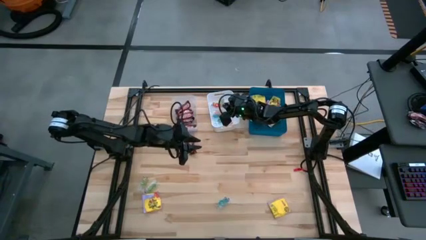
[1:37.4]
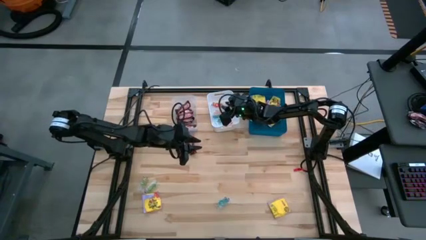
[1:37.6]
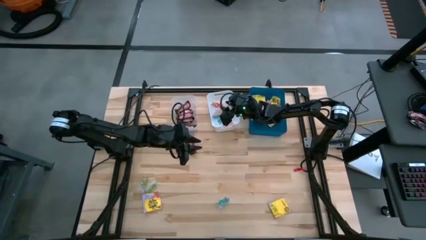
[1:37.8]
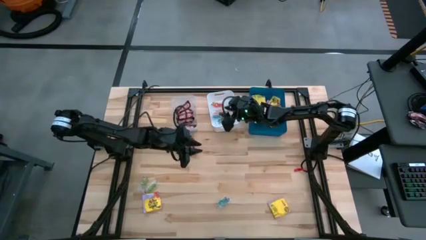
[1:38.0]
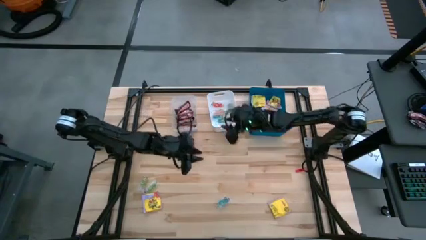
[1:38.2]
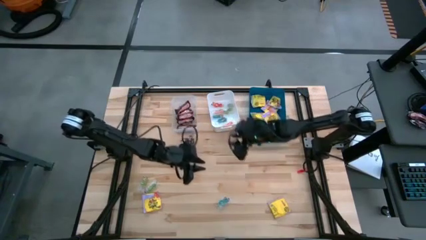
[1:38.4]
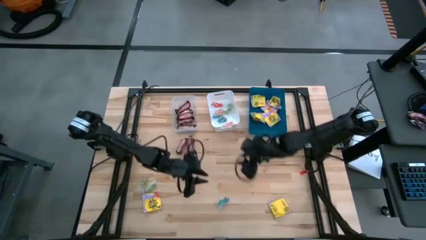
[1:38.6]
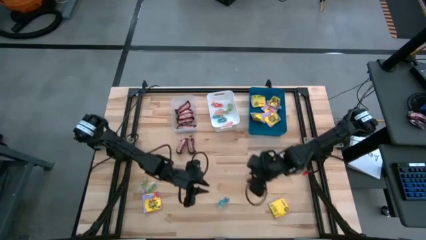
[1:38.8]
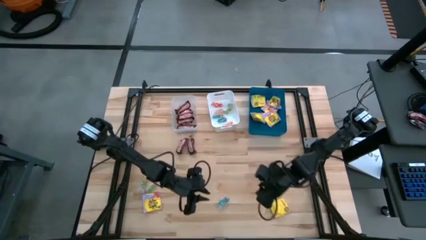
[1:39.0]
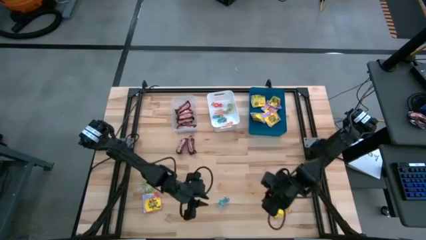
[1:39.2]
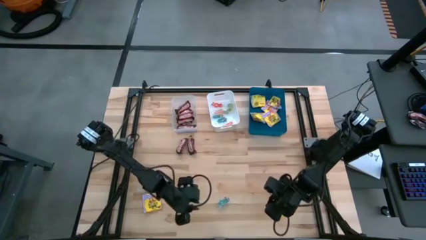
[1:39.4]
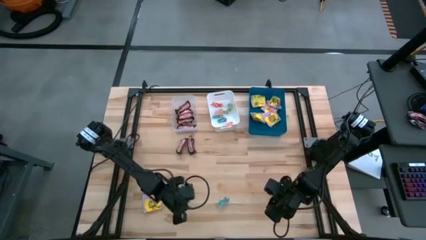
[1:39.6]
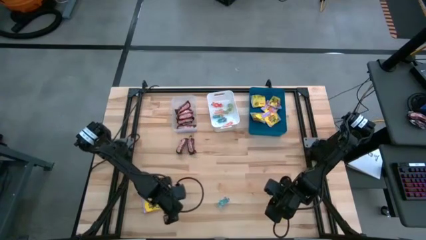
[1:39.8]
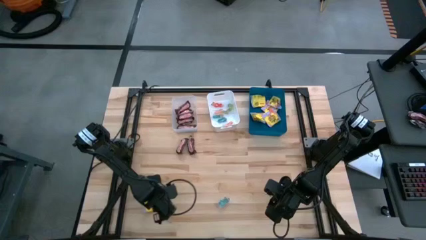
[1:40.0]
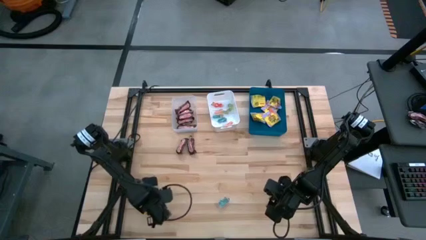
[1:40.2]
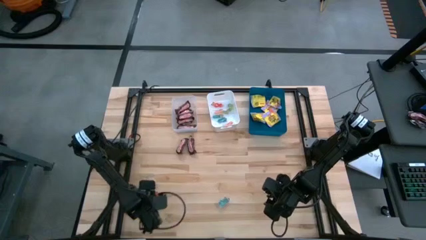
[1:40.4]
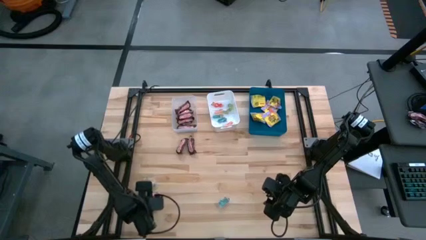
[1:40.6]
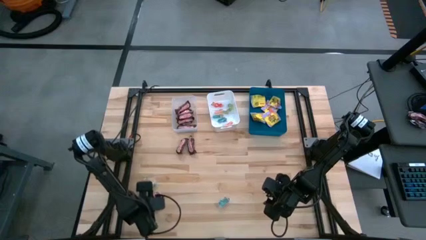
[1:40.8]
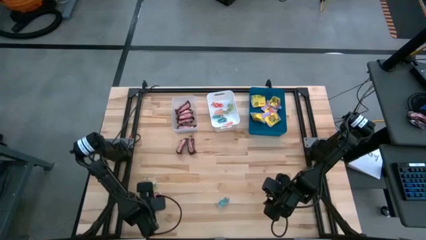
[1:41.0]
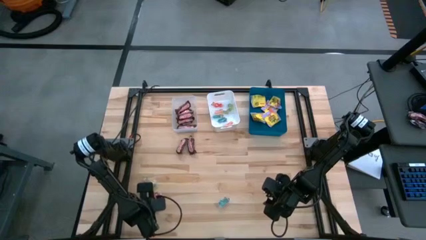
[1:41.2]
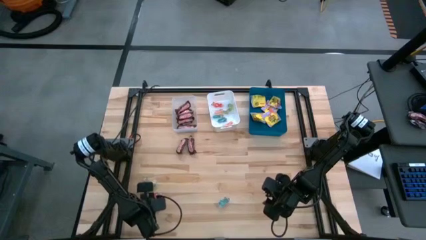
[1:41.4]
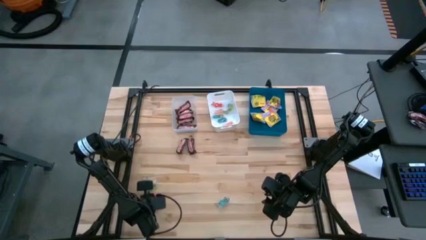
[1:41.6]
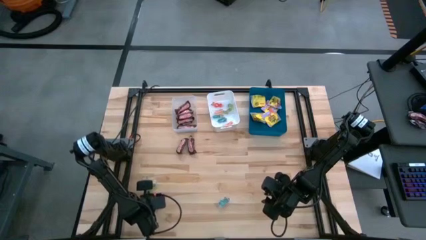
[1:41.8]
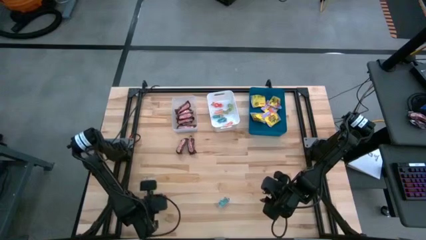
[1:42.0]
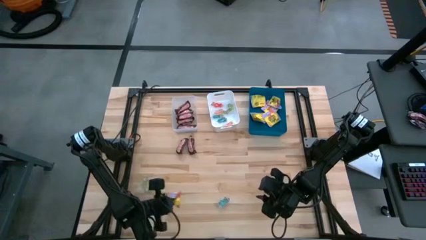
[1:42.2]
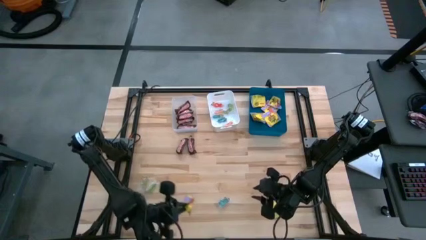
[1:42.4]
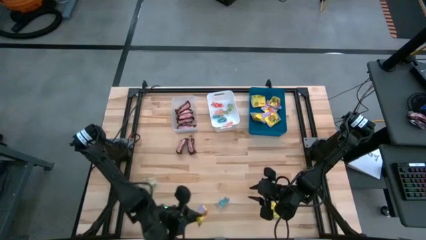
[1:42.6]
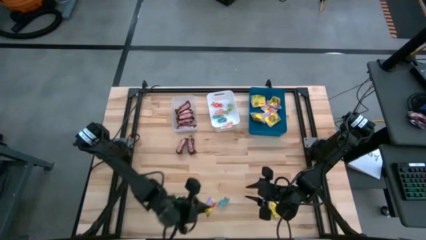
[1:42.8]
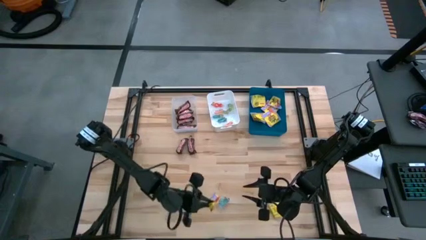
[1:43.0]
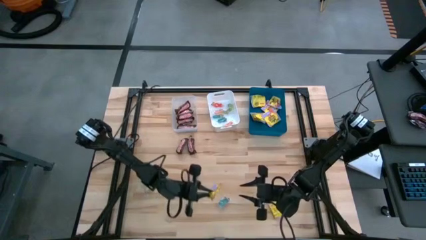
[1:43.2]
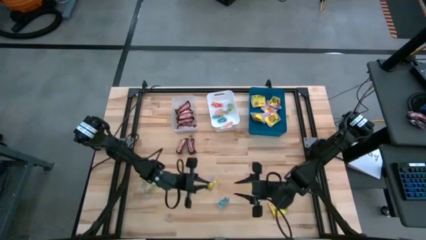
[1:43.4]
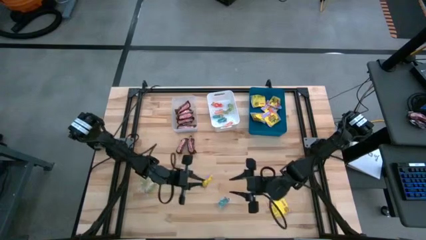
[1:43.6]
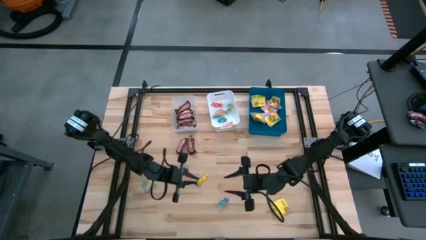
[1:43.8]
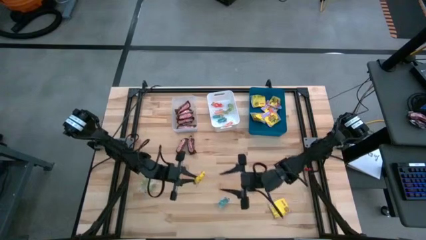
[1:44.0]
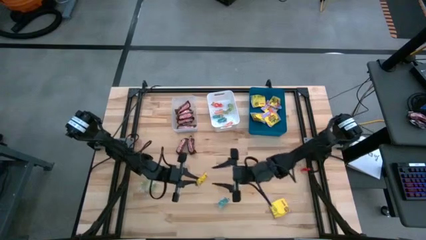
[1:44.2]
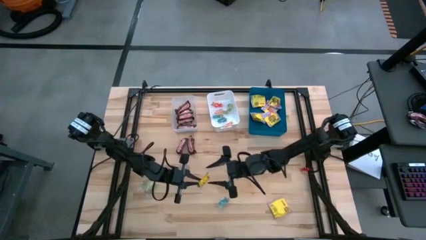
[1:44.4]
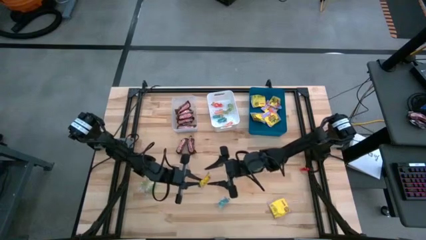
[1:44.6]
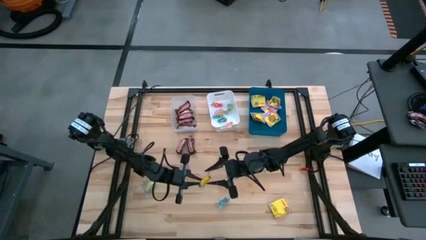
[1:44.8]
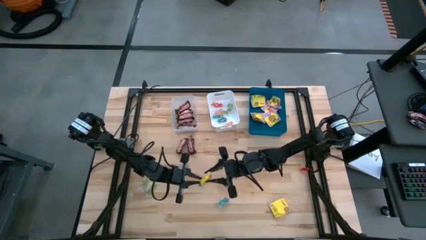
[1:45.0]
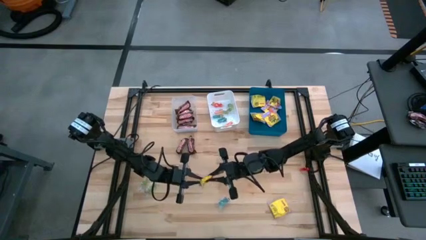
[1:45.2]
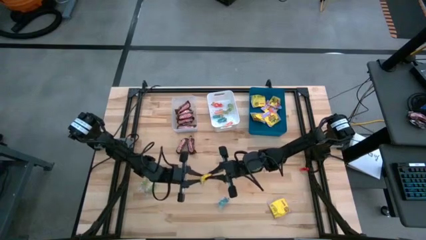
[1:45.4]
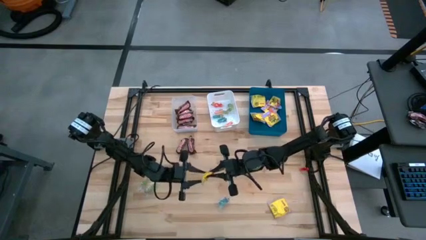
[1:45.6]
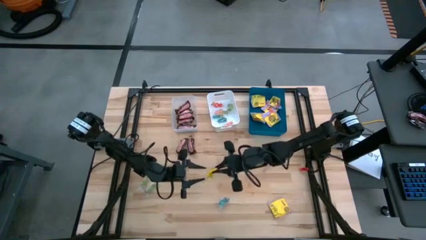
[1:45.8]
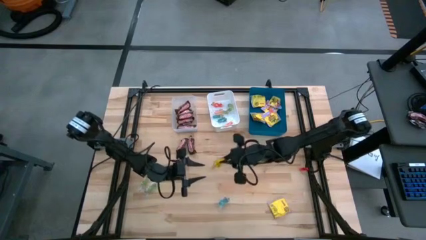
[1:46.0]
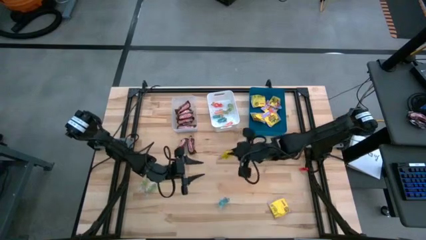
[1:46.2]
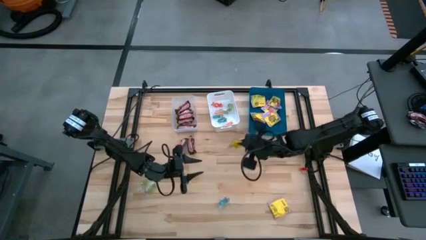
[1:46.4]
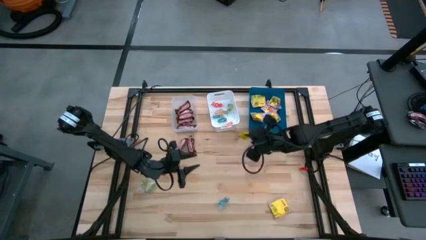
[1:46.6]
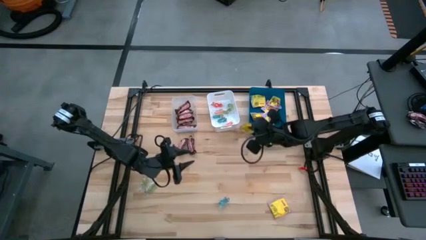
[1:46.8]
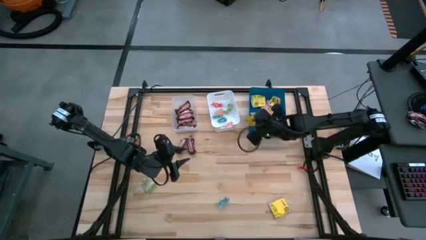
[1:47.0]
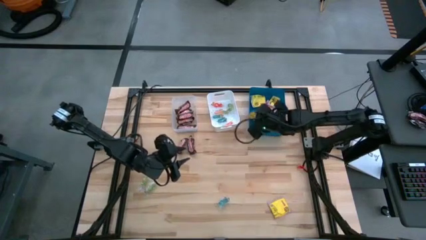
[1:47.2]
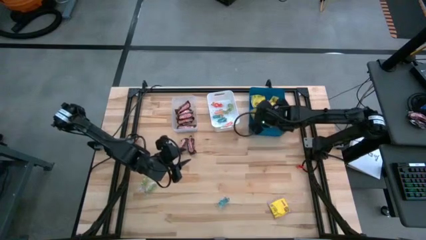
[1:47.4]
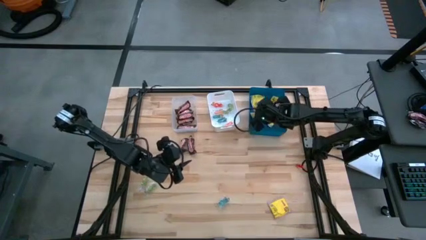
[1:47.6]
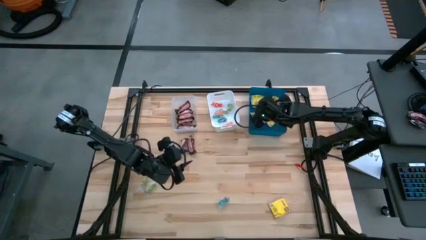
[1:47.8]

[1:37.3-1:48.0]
Task: Sort candy
Put the left yellow sour patch candy into the blue bin

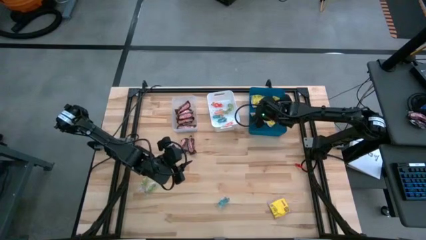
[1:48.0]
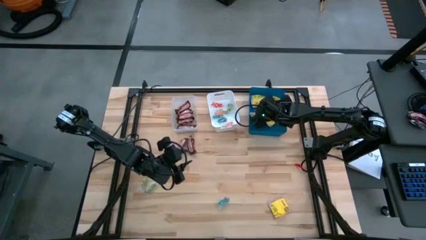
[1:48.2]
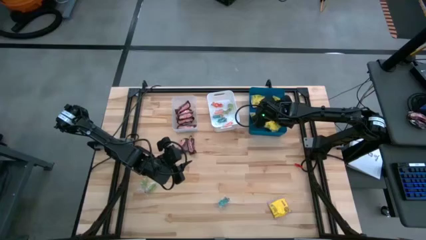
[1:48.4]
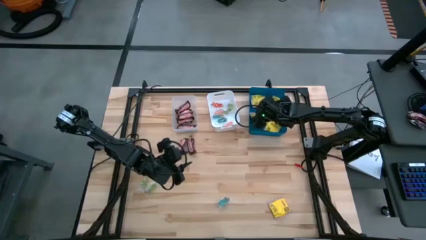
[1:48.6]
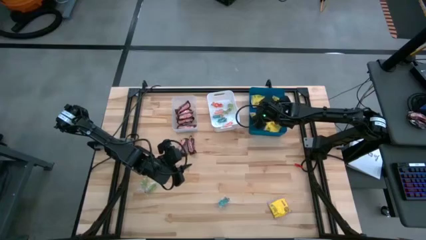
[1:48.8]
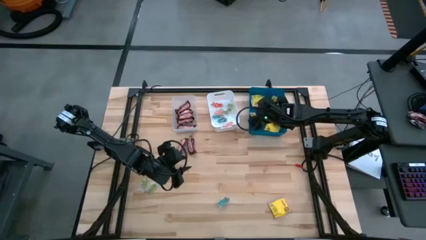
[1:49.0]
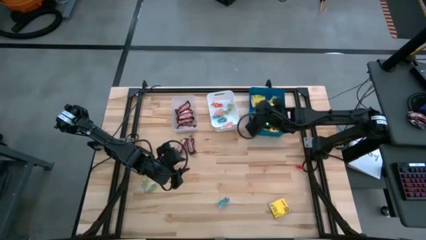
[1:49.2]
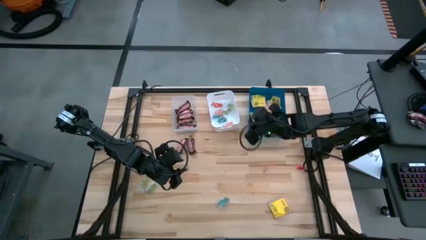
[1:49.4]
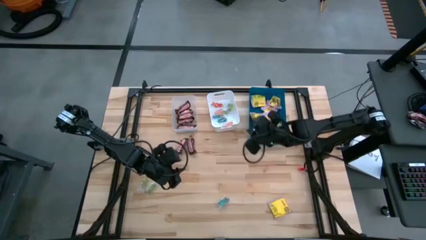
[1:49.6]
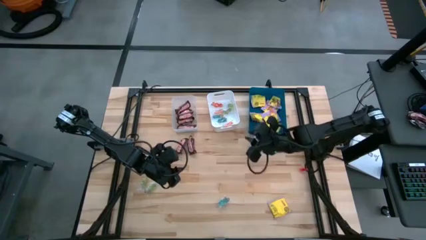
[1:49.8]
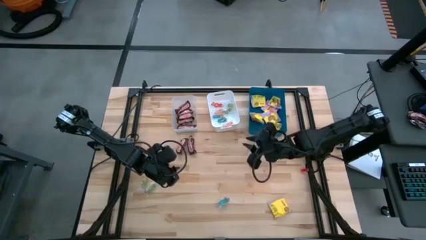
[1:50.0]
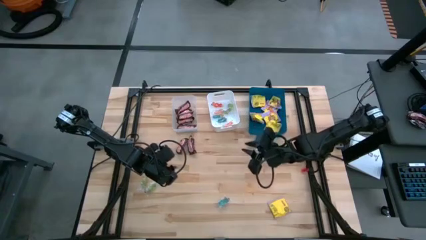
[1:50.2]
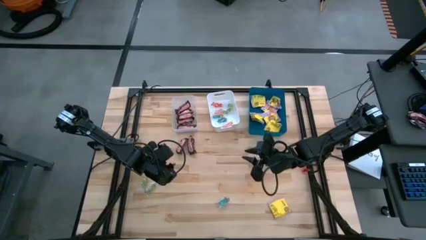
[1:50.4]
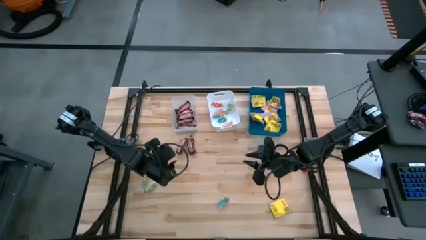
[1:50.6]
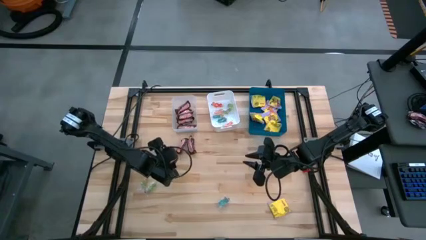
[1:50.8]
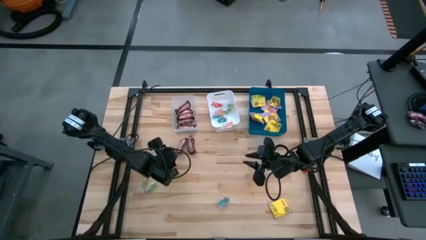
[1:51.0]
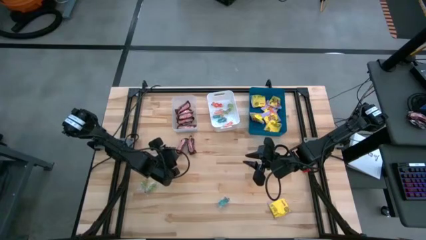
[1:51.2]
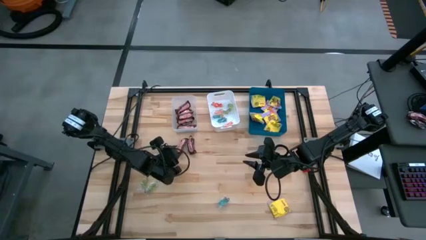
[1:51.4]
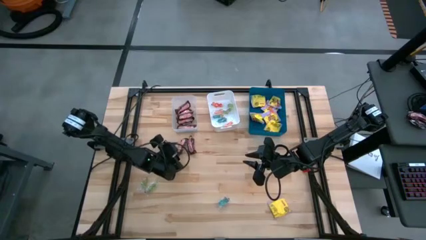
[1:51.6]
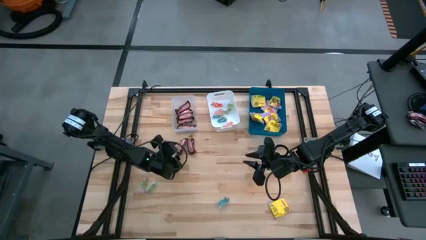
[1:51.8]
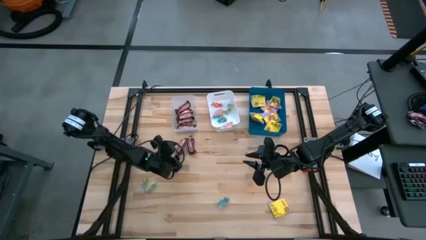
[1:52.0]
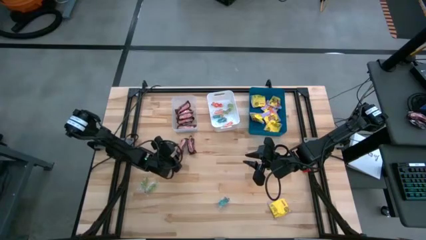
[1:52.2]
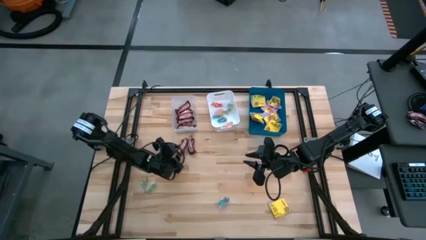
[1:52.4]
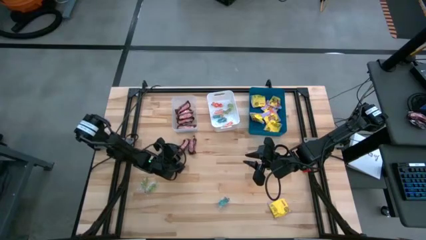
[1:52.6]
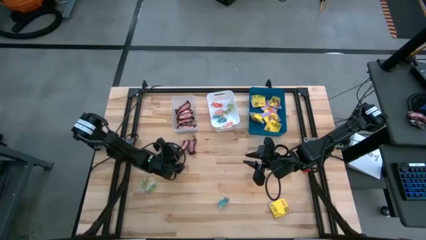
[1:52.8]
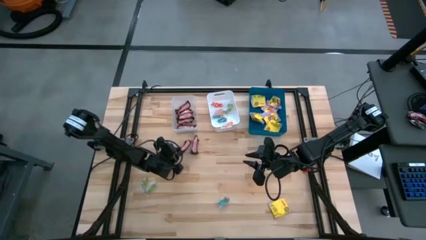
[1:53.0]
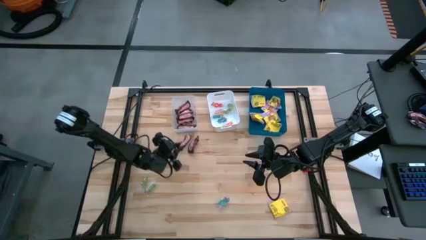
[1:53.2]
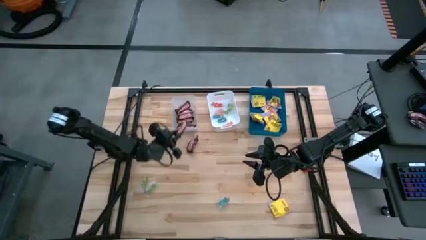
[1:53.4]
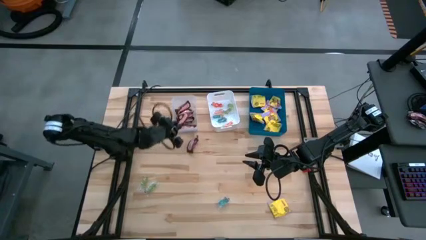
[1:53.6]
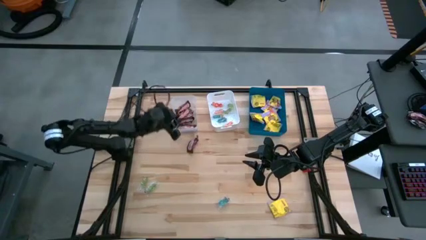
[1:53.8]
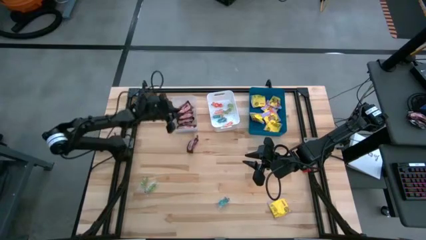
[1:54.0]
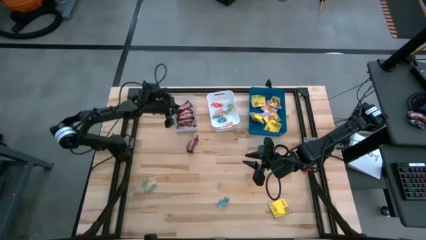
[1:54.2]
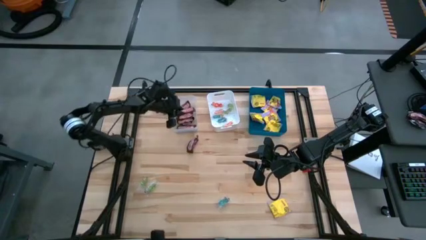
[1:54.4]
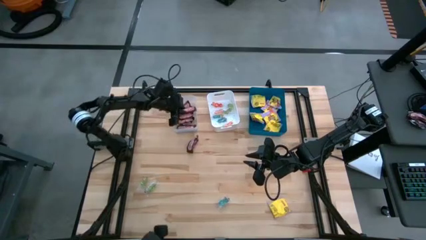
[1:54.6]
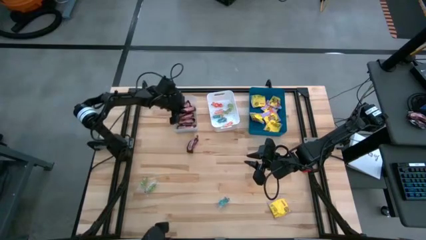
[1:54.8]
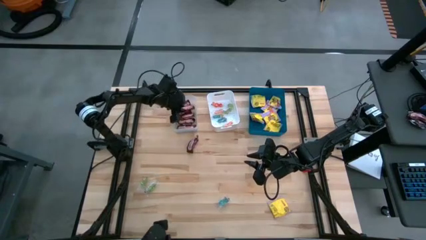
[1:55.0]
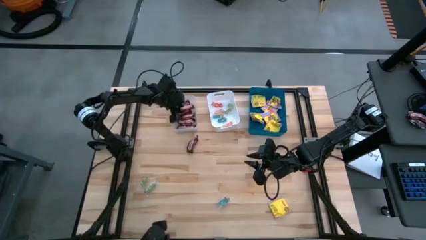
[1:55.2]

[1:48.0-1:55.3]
Put the left brown candy bar into the transparent bin
